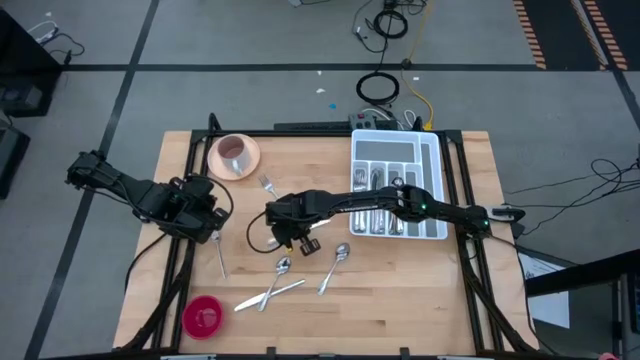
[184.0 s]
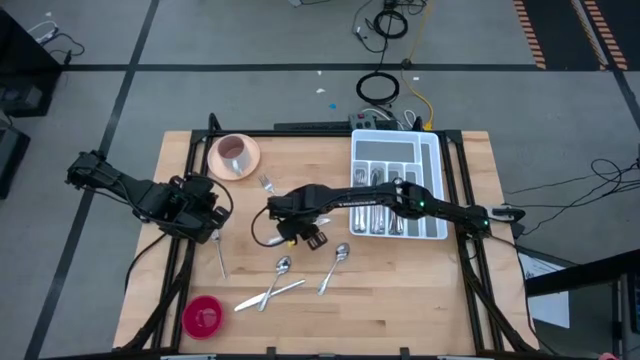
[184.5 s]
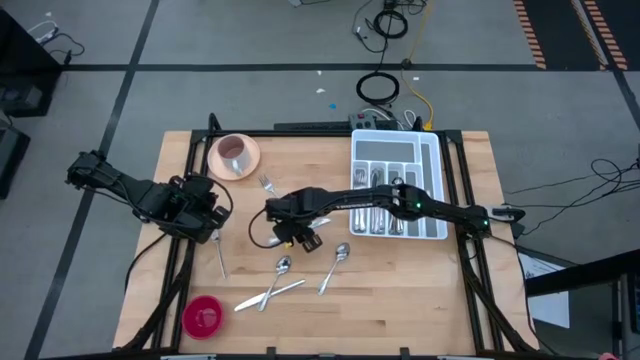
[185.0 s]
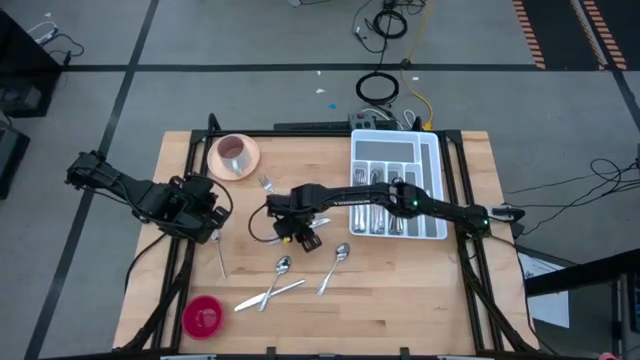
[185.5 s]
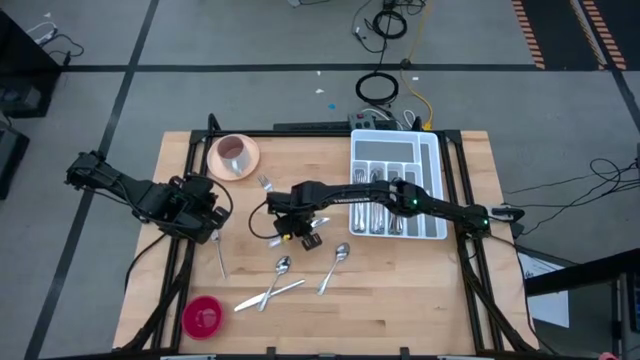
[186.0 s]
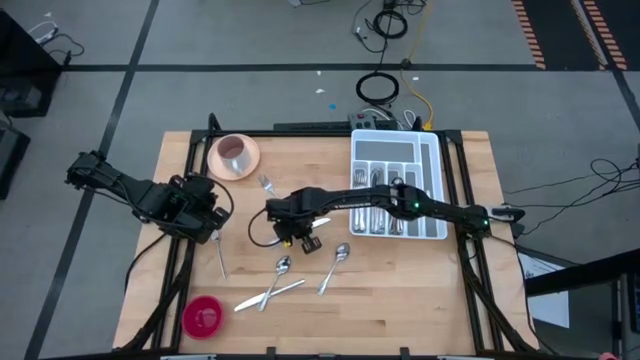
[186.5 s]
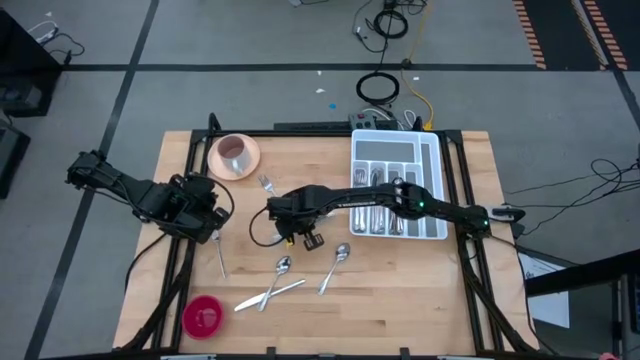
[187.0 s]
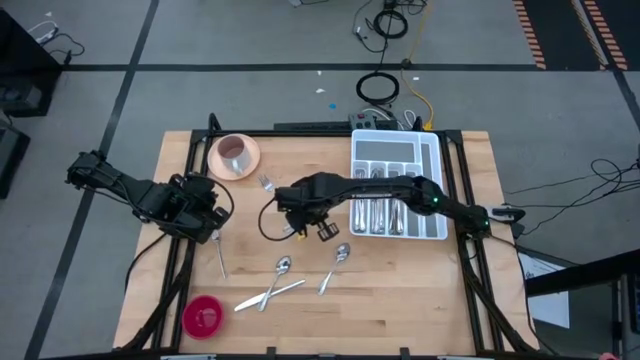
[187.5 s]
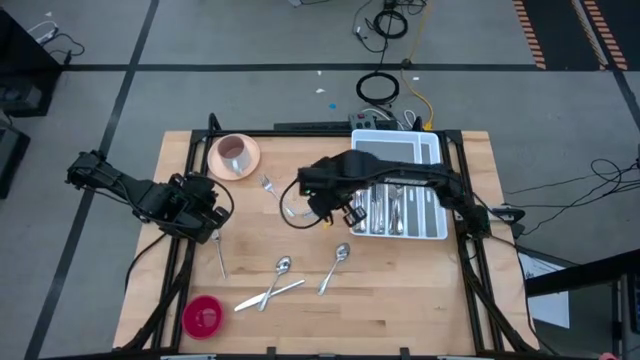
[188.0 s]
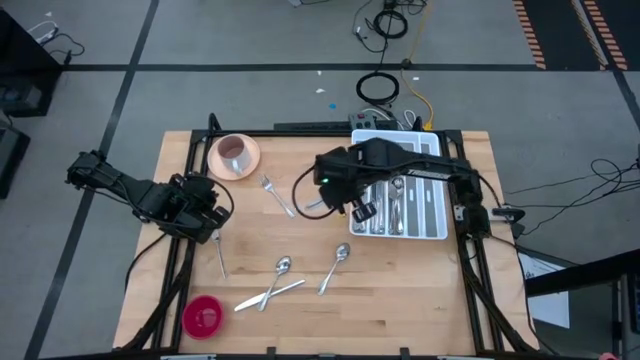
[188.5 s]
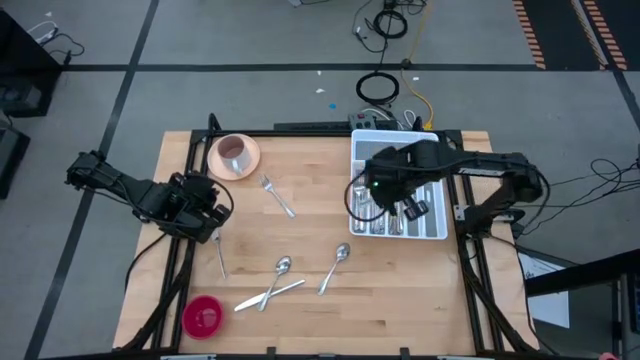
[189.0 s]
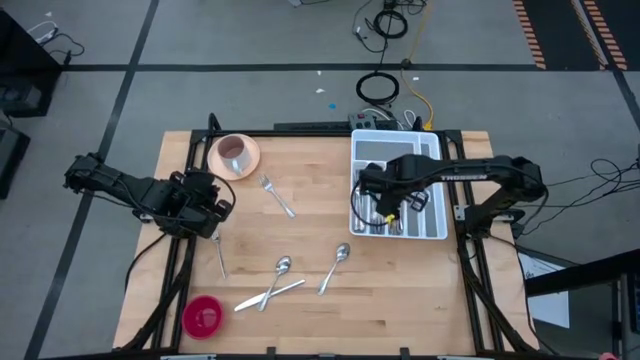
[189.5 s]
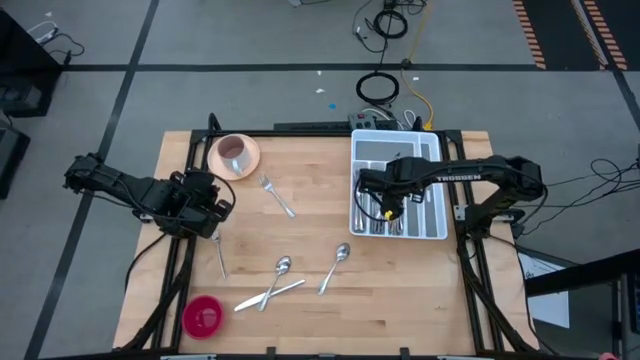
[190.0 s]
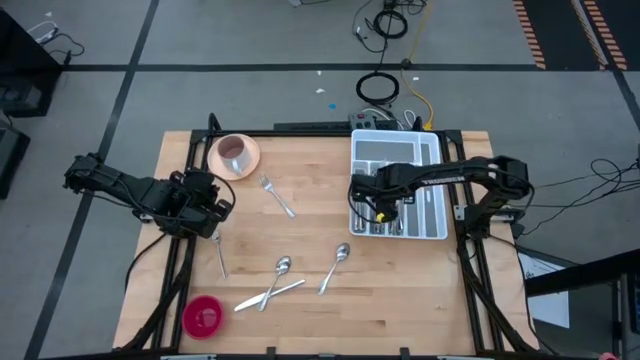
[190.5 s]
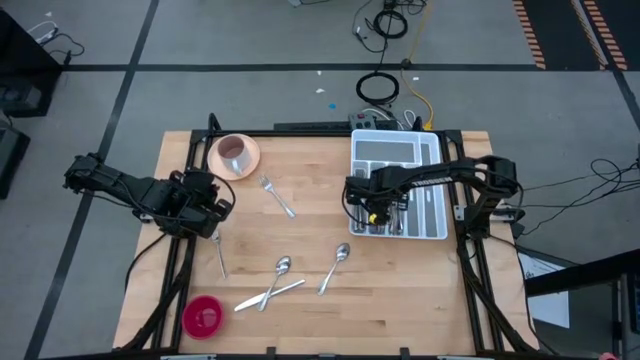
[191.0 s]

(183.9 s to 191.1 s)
Task: Sort silverware
Put the top silver knife into the white silverware tray

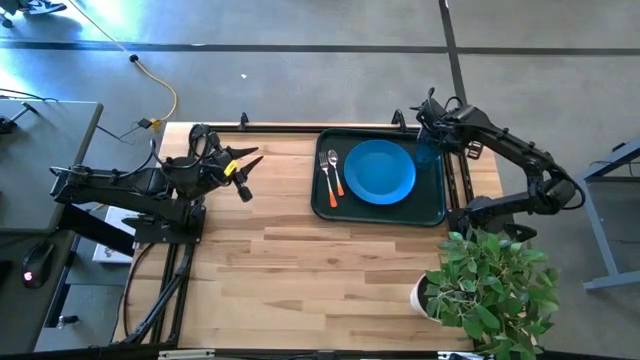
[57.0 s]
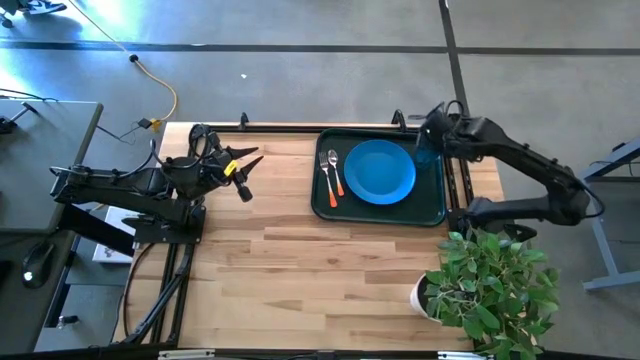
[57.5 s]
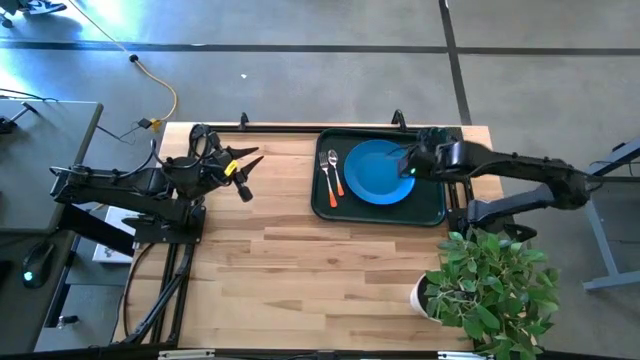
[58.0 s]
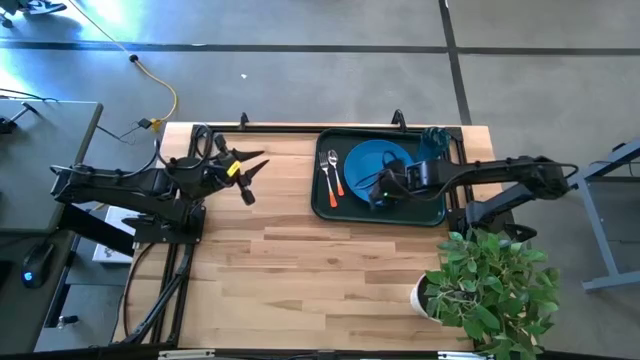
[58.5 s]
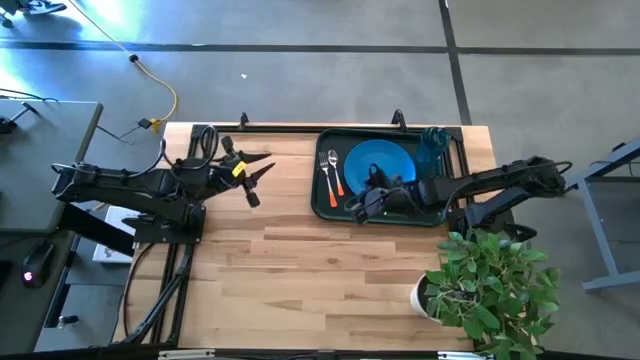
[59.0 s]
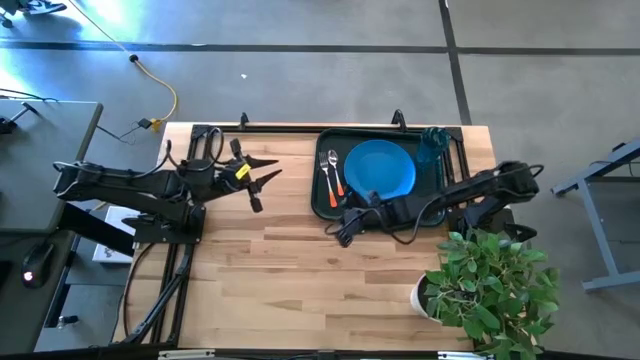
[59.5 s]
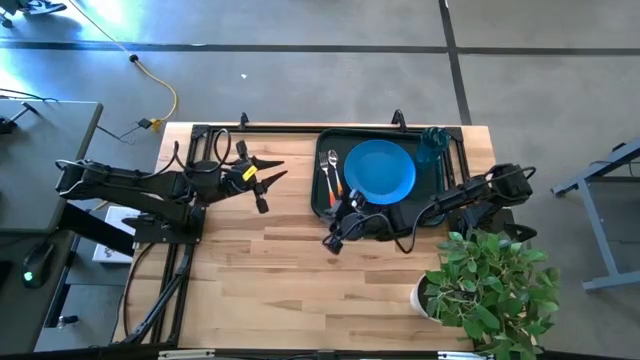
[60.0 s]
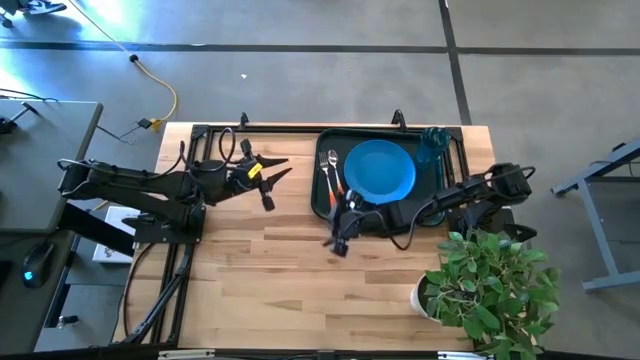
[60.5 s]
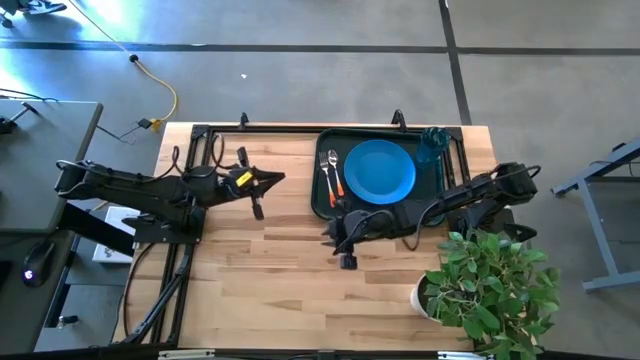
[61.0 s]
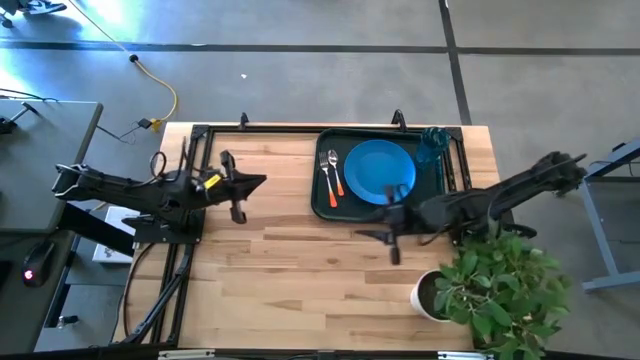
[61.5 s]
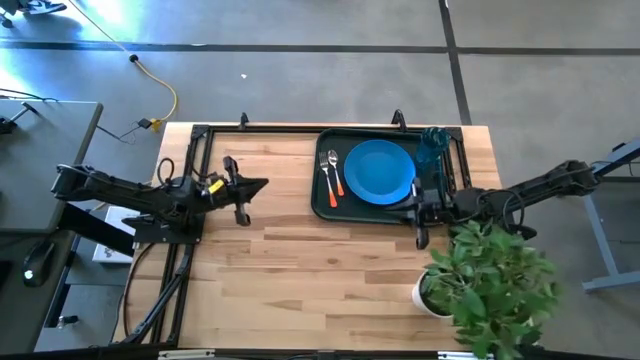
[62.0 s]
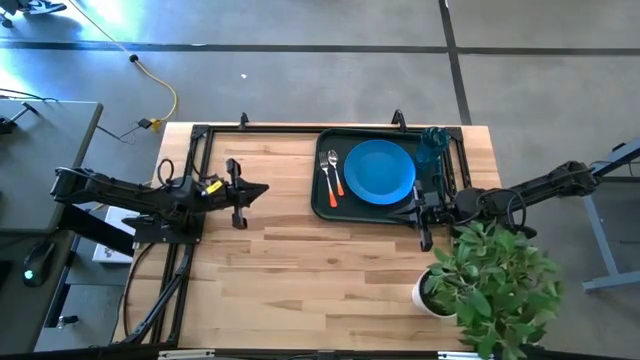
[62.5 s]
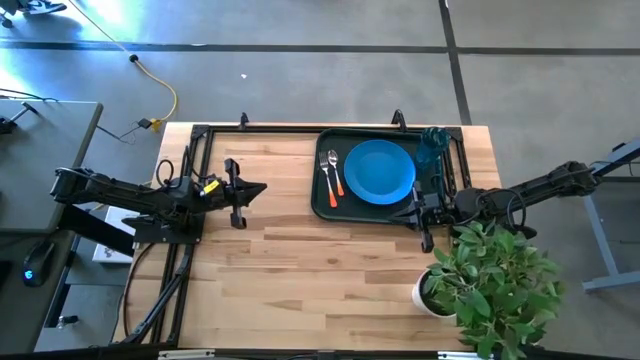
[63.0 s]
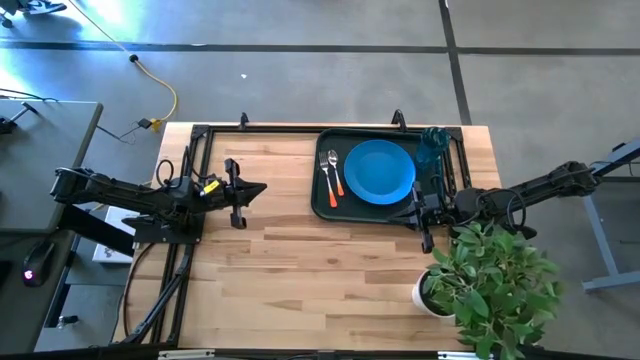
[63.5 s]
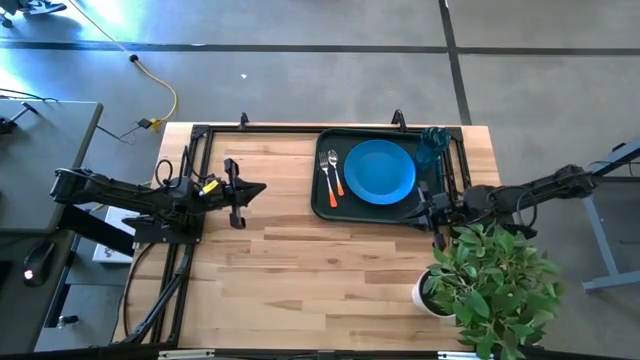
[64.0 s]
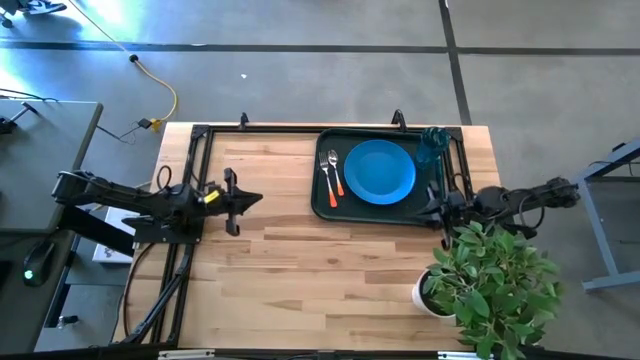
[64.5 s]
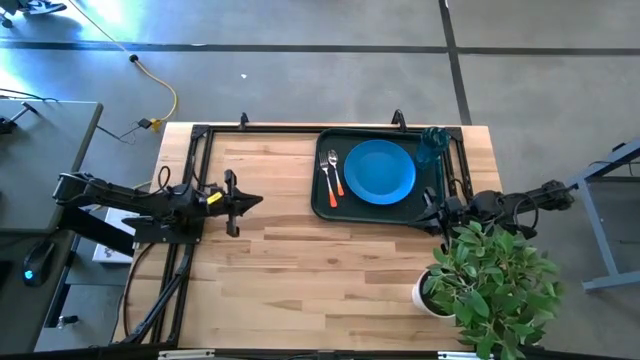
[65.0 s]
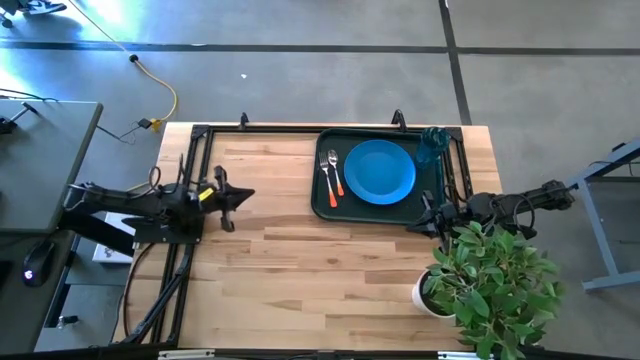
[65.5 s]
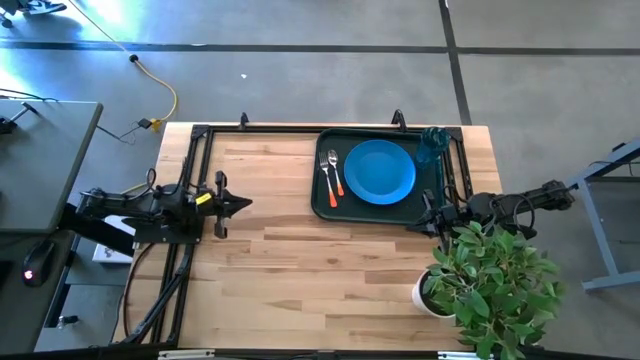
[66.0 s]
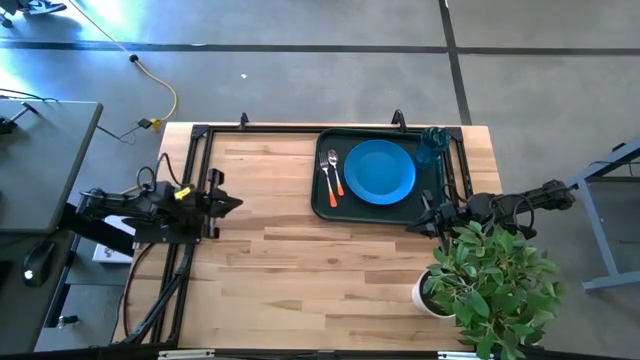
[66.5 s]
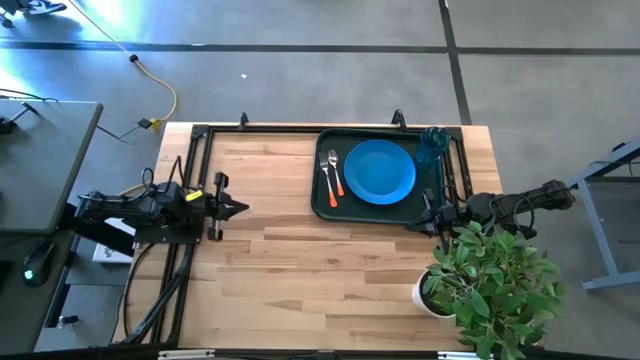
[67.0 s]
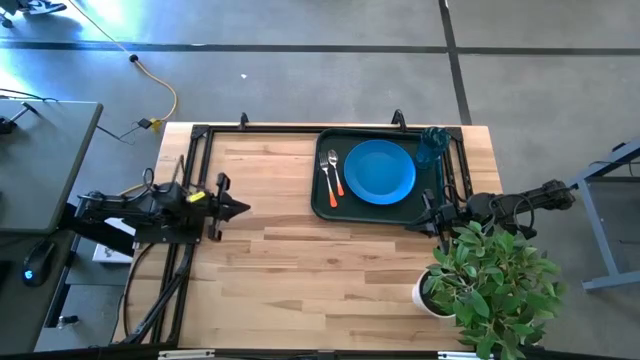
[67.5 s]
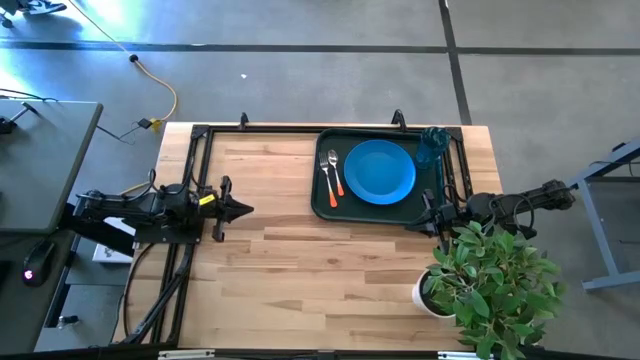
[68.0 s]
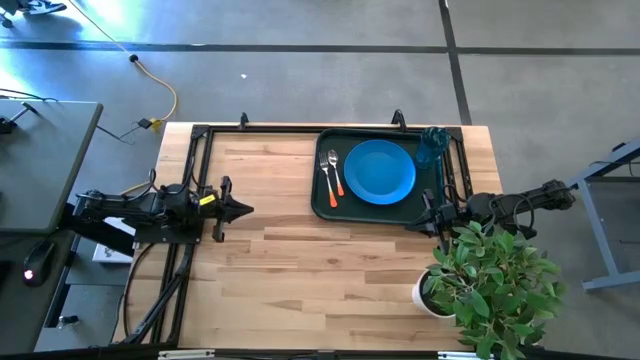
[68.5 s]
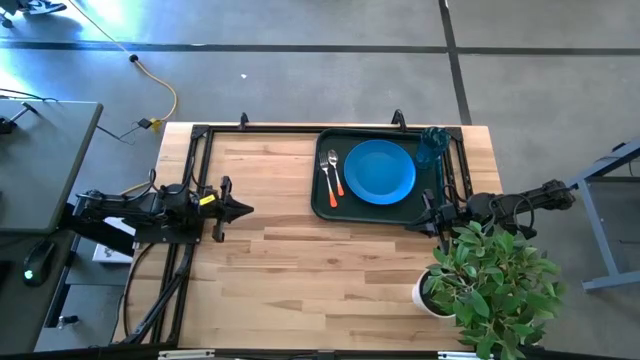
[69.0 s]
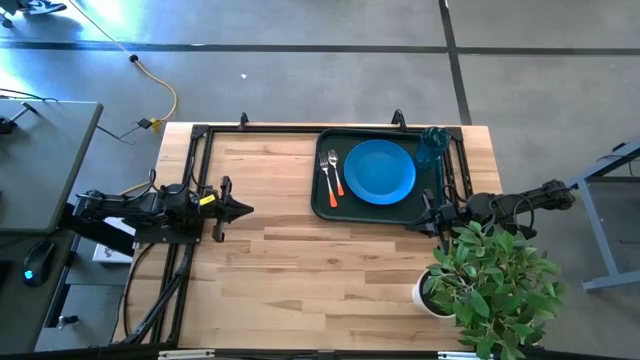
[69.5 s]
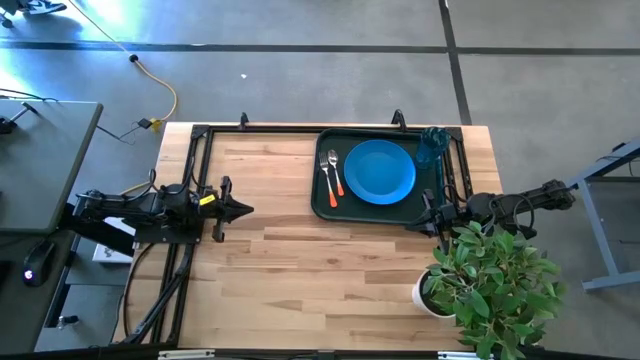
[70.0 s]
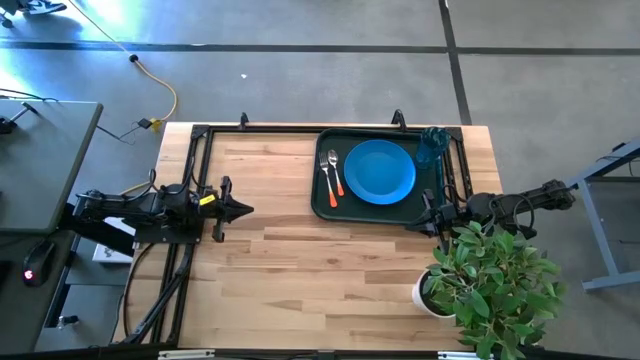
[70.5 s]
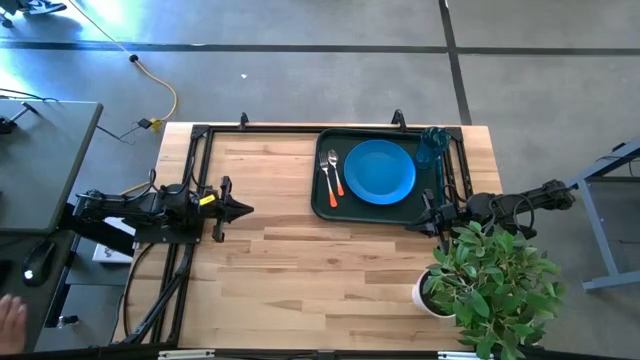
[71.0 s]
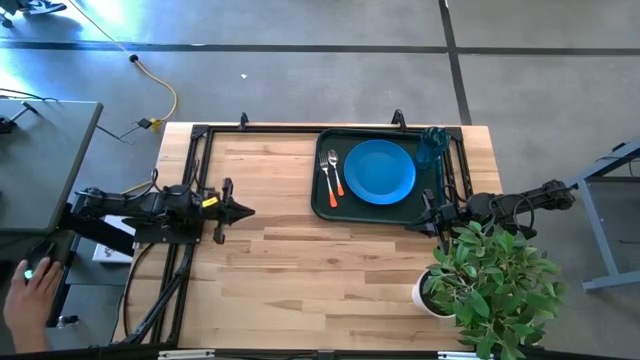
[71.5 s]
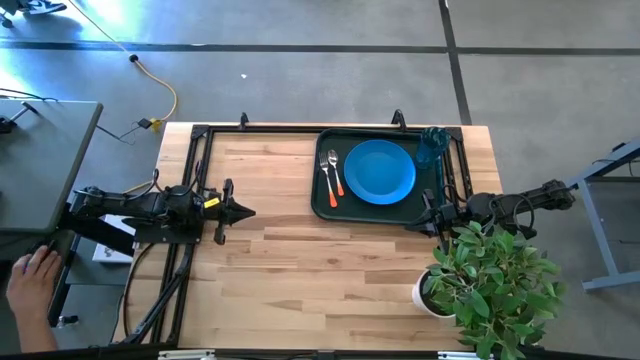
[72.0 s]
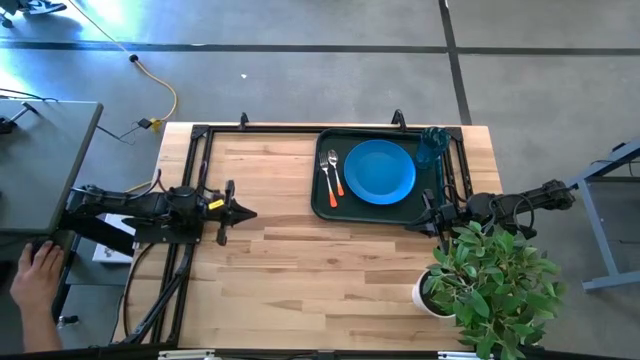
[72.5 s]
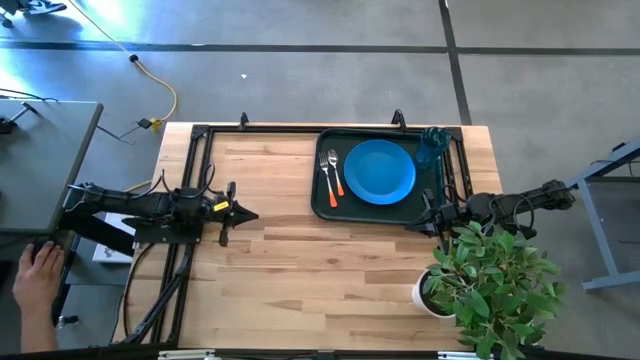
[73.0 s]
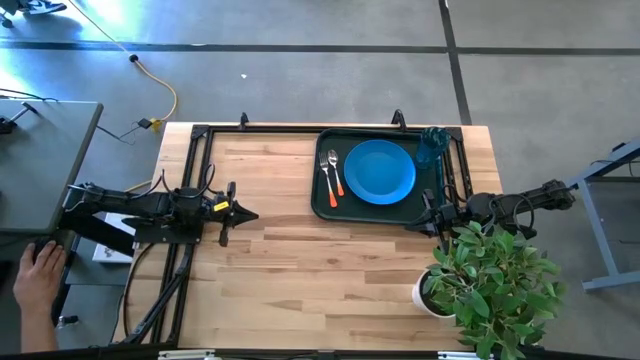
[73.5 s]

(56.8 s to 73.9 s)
Task: Pick and place plate/cup/fork/spoon on tray
Return to Home Position
